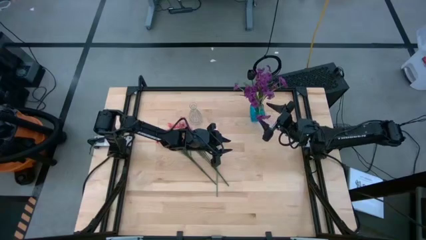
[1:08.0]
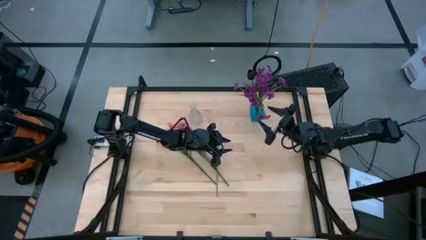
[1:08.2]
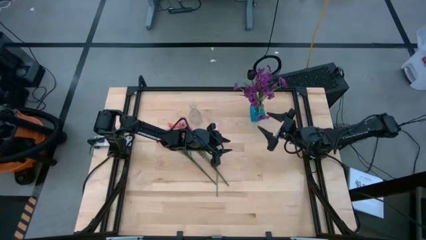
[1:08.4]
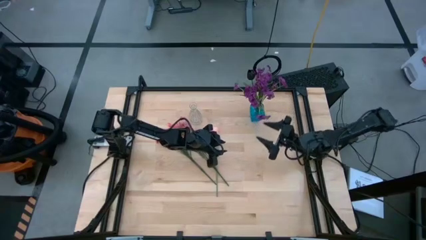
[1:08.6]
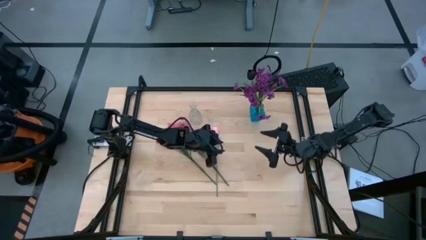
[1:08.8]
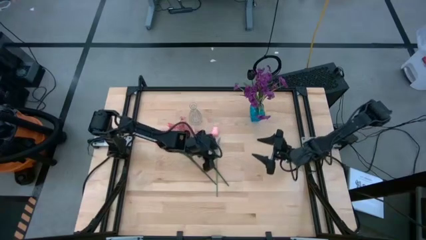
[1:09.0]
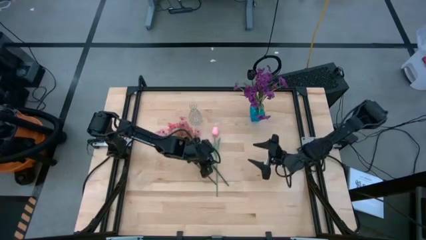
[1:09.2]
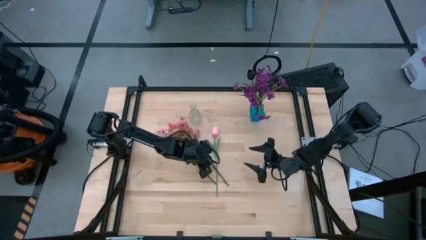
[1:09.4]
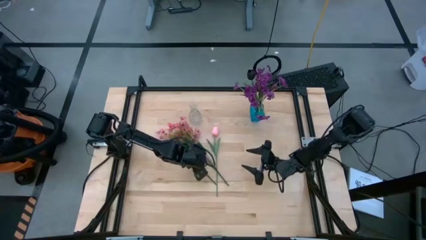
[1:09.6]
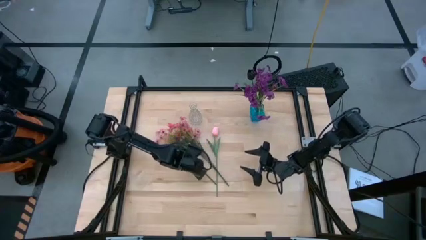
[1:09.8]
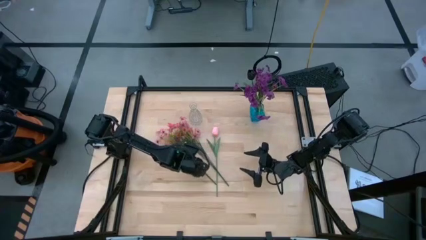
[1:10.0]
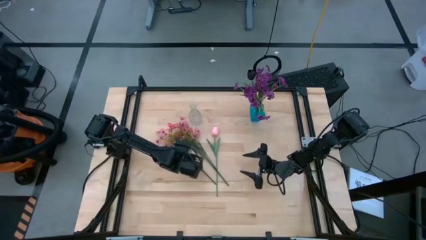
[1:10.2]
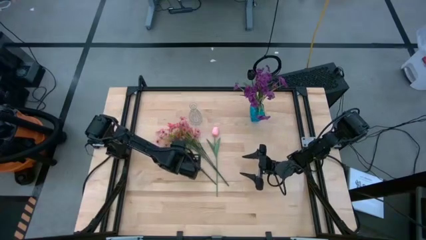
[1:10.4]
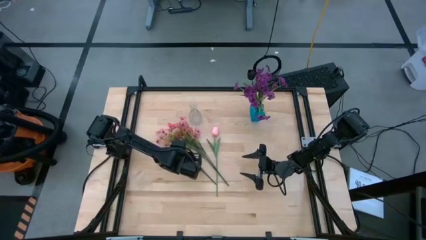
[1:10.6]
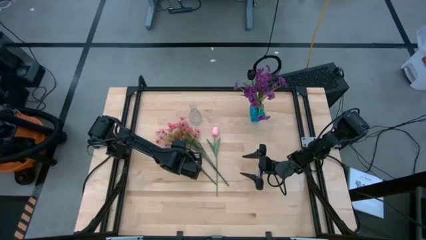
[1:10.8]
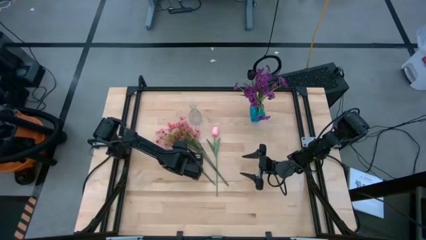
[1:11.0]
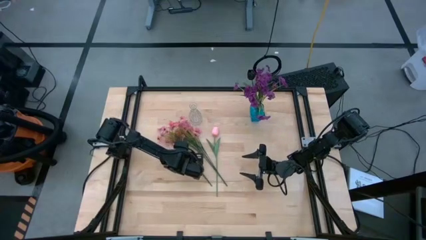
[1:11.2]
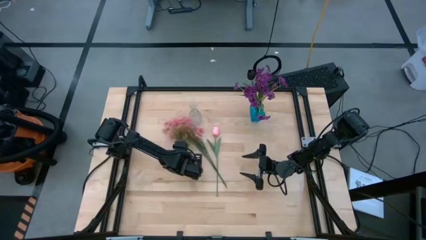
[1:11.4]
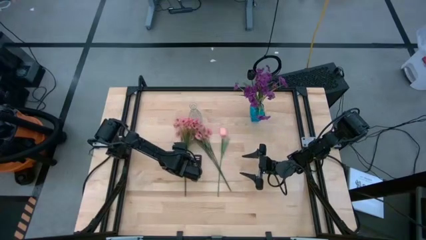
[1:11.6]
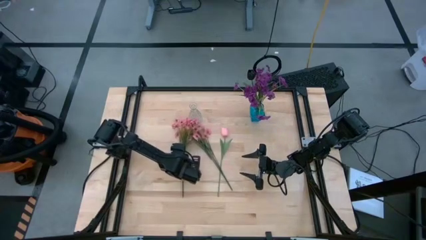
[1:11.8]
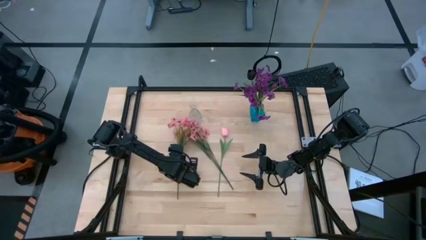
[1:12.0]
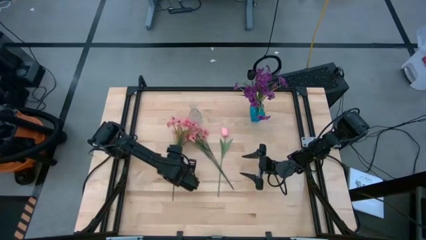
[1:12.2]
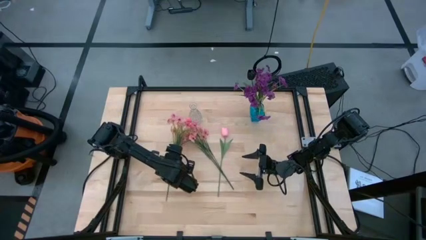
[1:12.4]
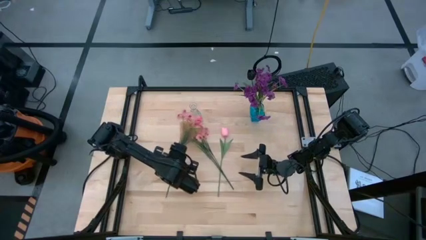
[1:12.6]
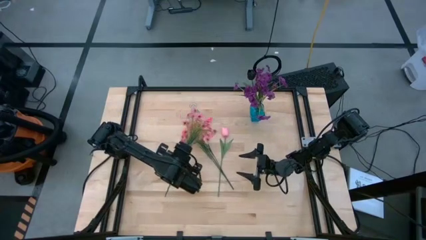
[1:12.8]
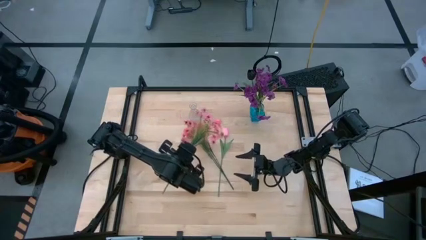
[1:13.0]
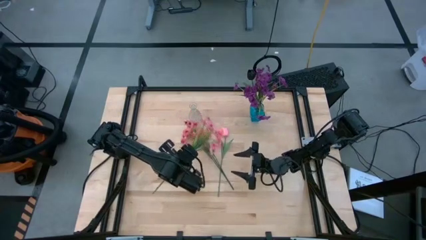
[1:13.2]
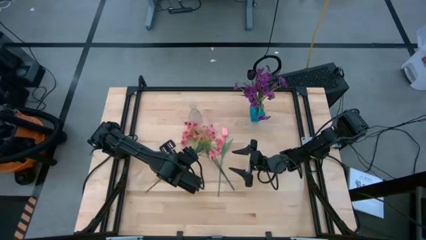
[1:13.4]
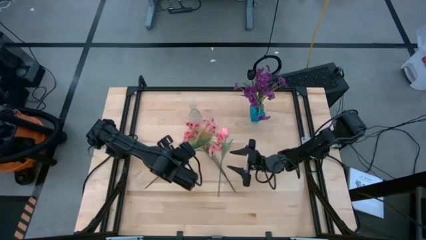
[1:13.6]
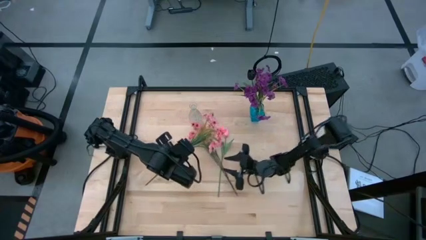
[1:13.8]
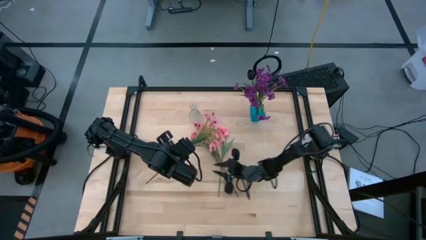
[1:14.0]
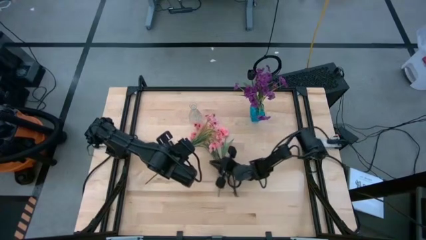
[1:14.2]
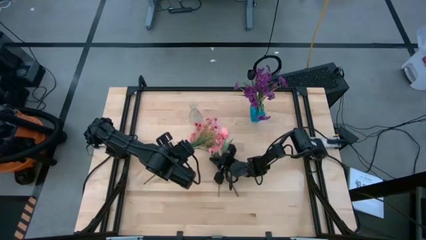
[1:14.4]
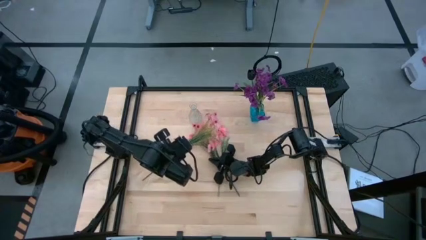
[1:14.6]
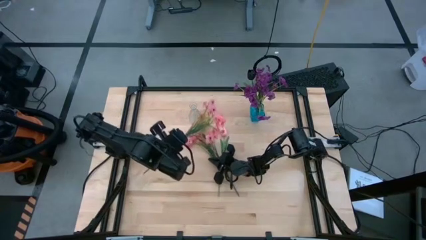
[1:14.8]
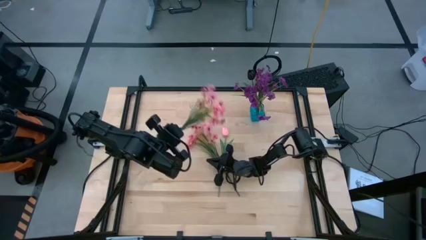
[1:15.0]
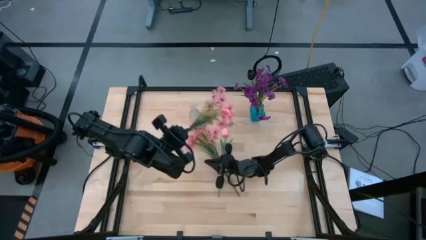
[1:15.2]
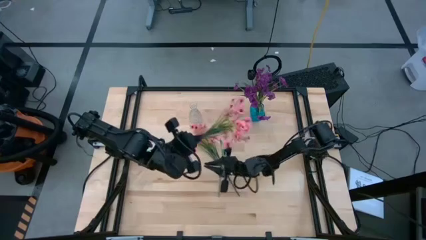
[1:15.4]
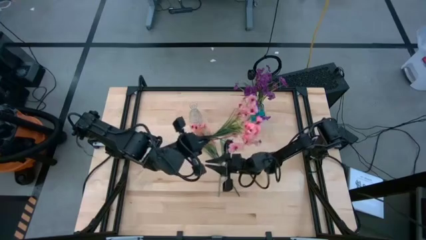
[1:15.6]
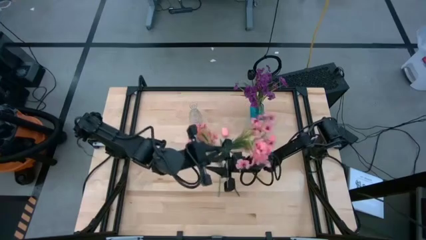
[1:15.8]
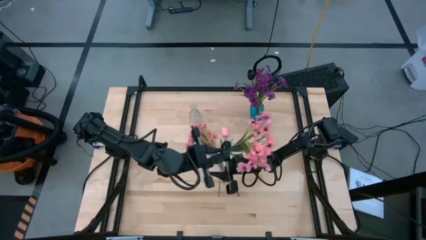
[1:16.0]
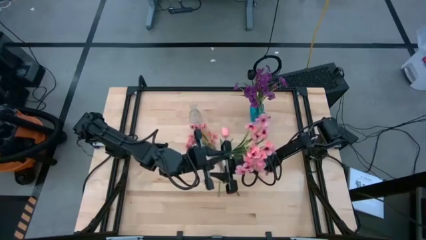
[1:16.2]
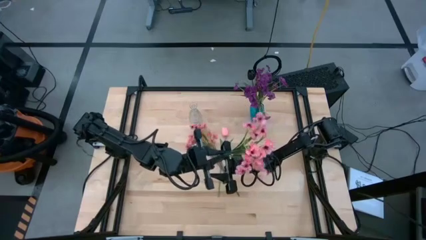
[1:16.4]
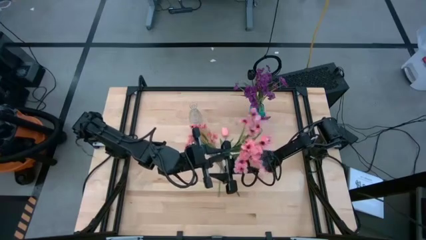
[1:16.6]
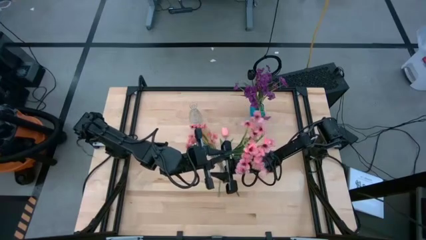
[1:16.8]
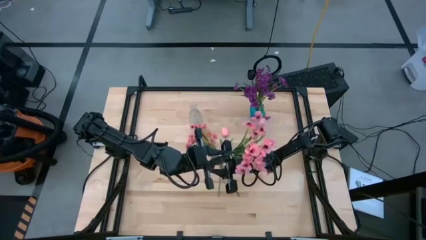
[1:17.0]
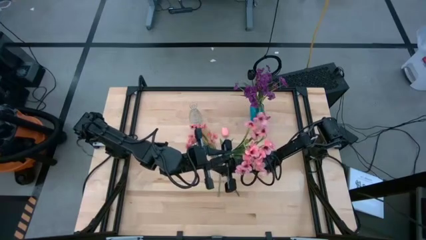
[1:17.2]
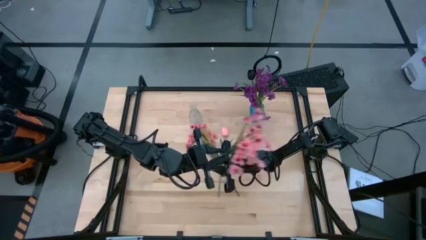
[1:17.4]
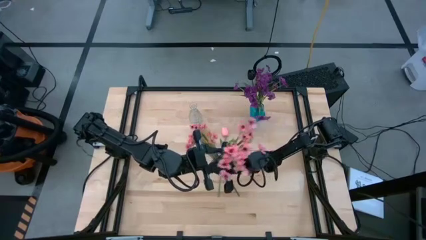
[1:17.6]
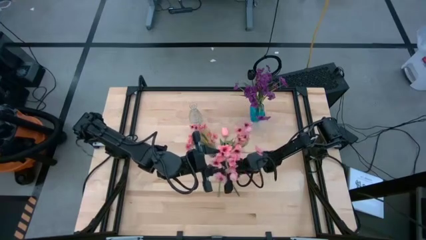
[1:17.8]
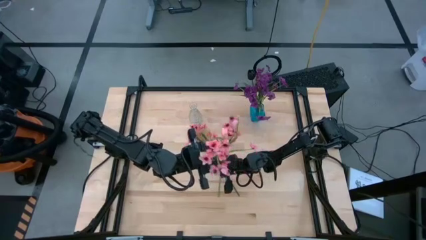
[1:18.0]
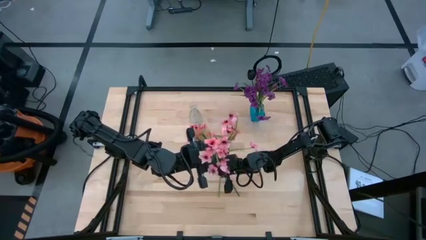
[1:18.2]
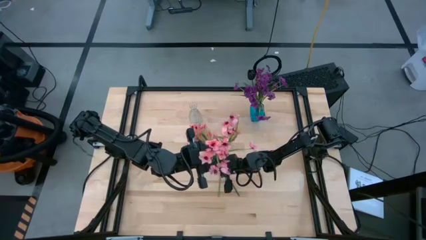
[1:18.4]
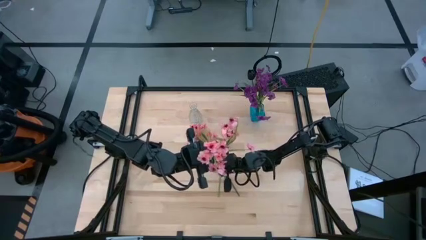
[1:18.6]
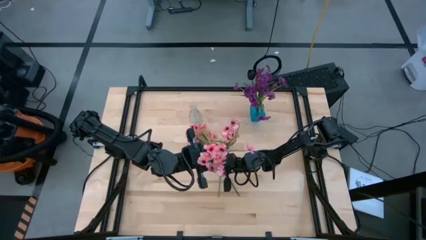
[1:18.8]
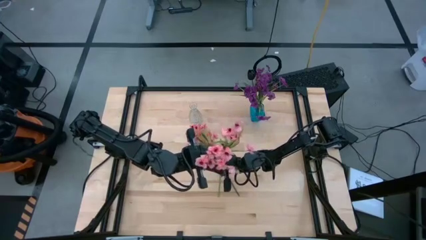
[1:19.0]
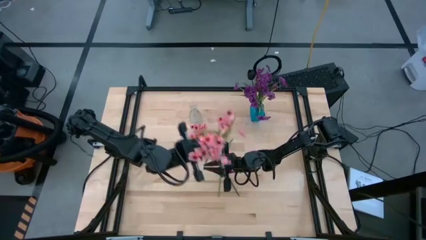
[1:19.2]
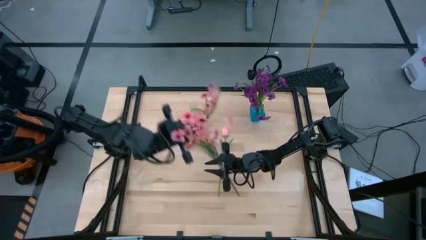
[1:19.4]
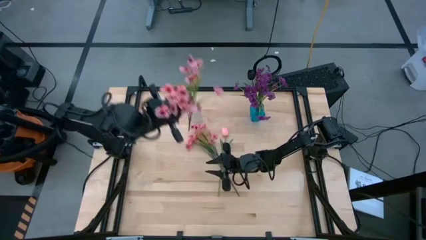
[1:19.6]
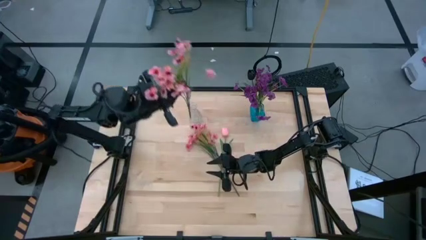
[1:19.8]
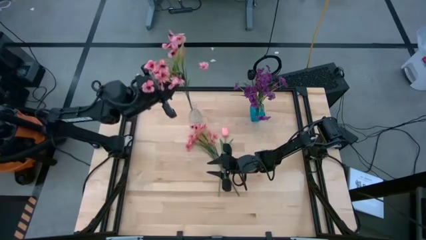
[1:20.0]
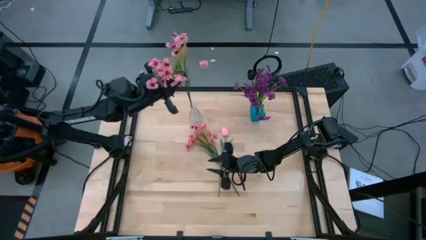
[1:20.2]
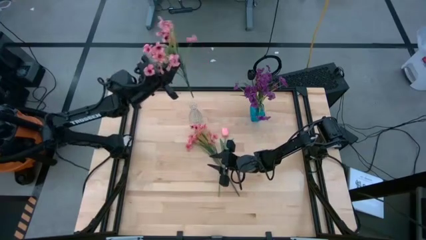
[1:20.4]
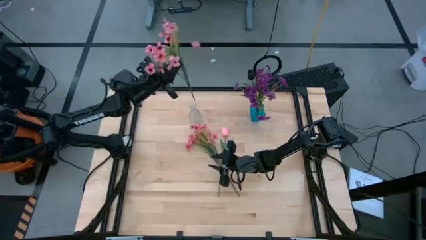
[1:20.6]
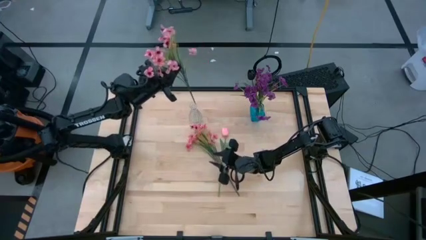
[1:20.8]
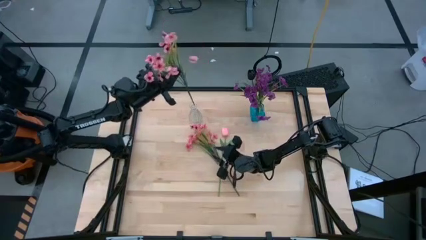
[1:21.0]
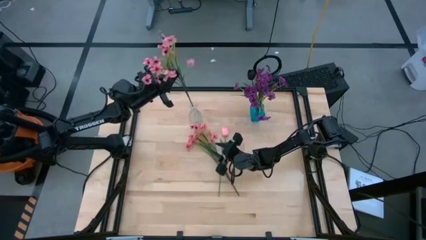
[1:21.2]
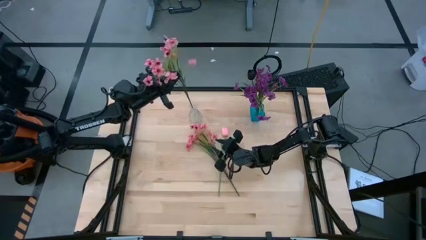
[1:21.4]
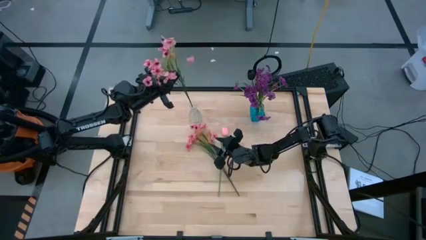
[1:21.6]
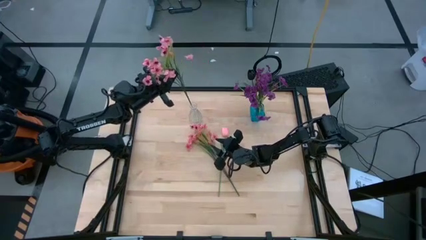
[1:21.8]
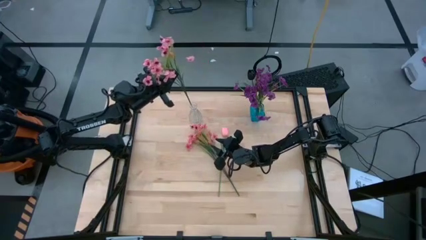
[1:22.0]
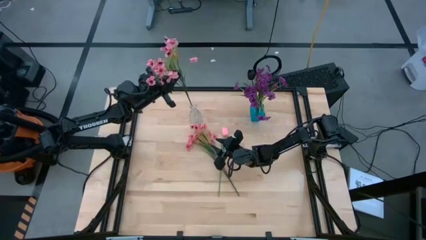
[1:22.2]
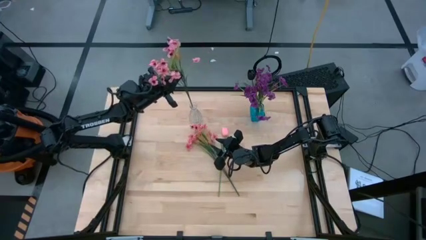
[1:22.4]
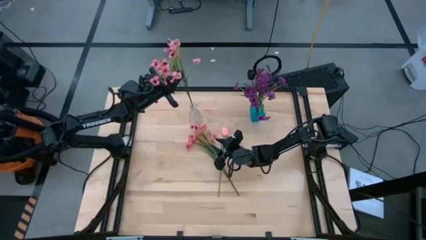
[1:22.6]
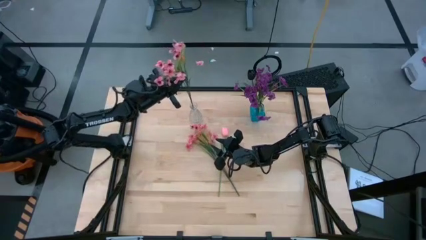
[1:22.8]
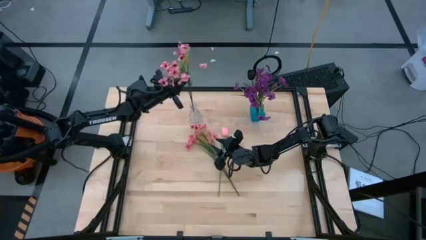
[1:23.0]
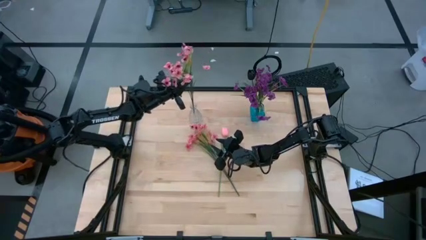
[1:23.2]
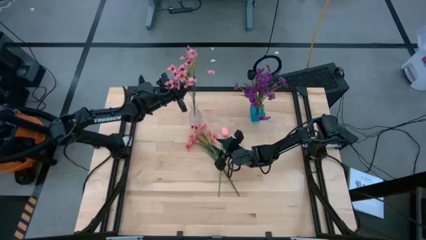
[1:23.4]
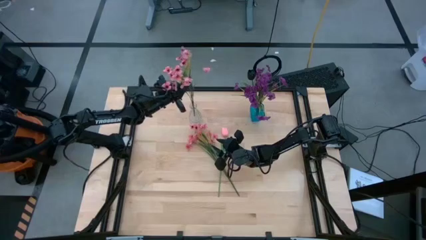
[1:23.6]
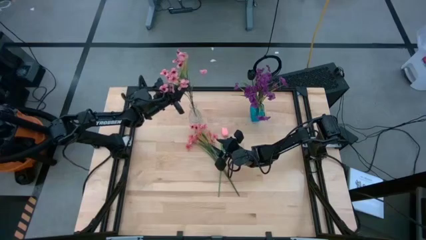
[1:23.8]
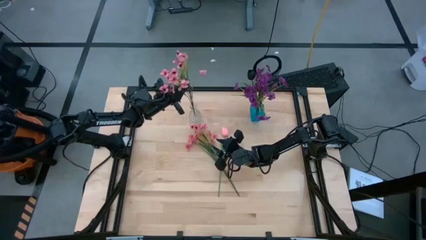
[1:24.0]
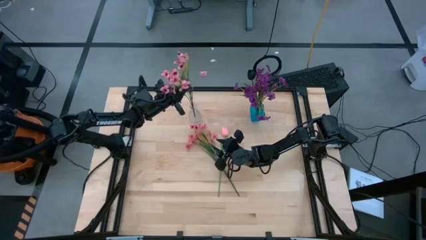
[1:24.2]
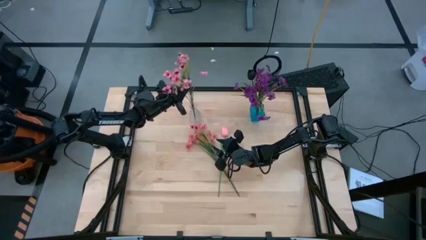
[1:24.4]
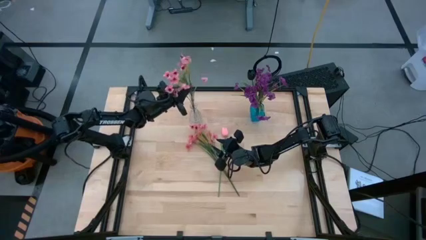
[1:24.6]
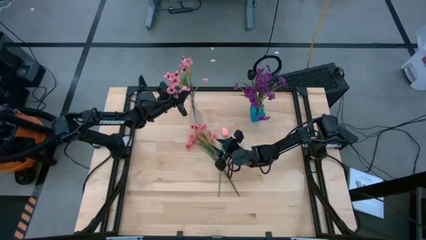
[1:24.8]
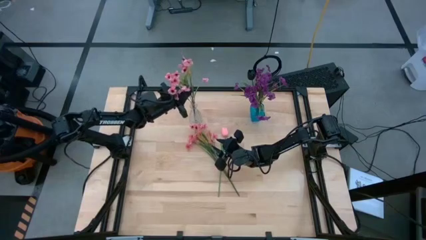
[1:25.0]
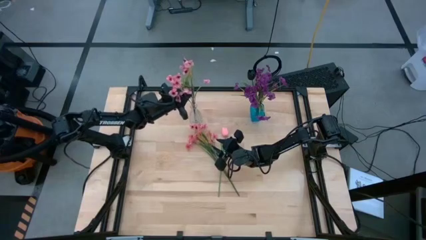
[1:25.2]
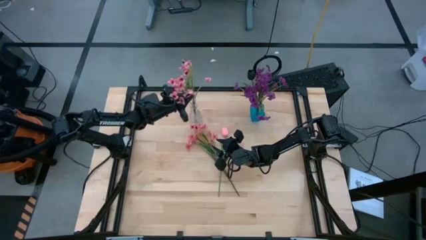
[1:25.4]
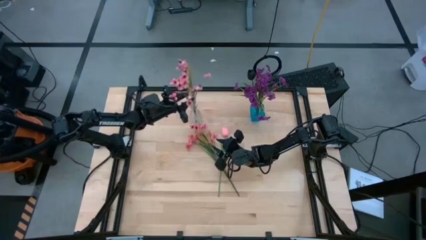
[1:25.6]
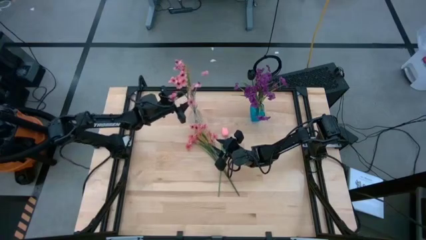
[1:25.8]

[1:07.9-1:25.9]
Task: Sort flowers into vase by color
Put the left pink flower into the transparent vase
